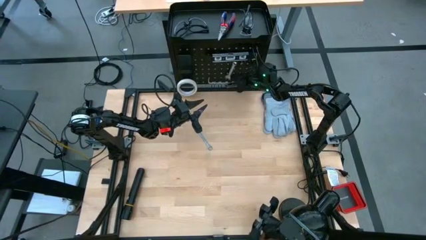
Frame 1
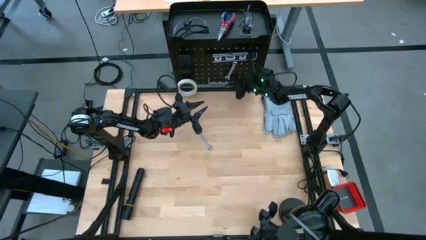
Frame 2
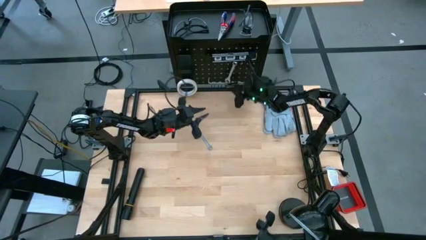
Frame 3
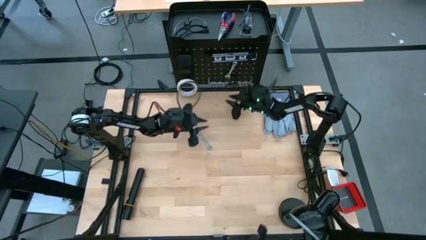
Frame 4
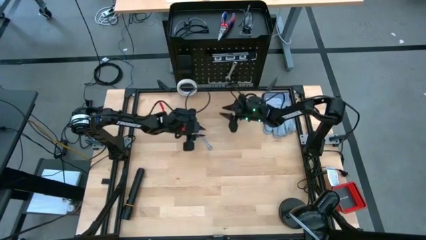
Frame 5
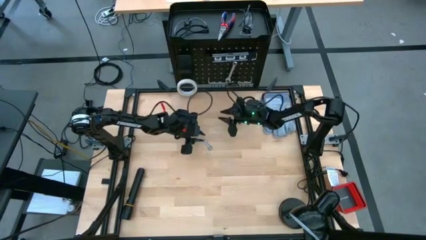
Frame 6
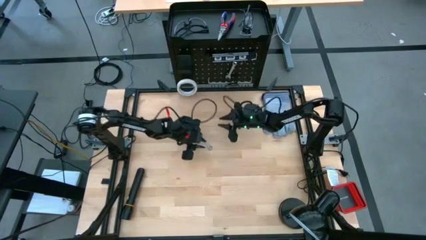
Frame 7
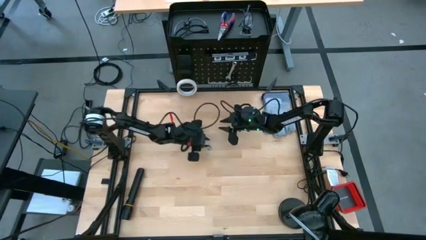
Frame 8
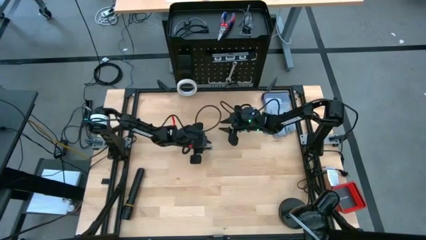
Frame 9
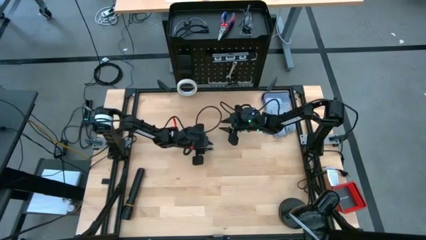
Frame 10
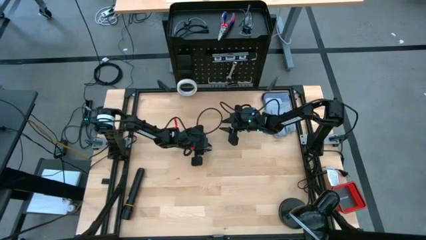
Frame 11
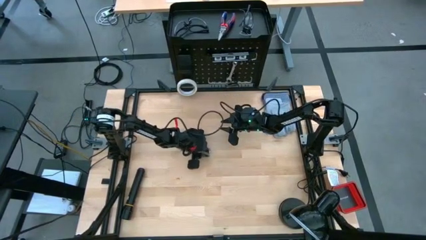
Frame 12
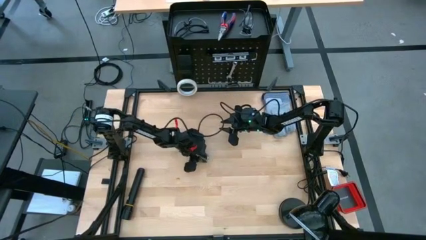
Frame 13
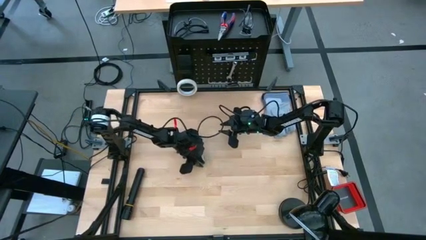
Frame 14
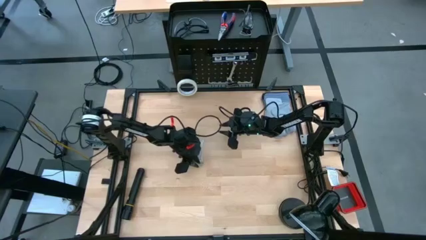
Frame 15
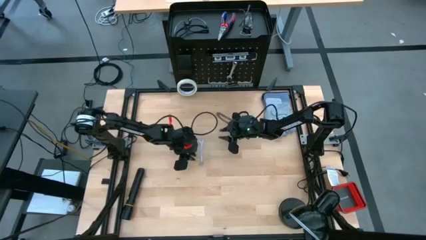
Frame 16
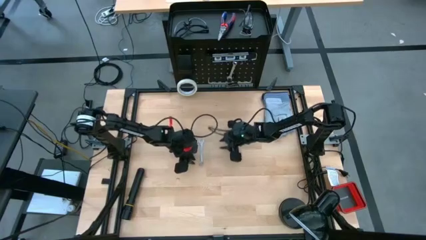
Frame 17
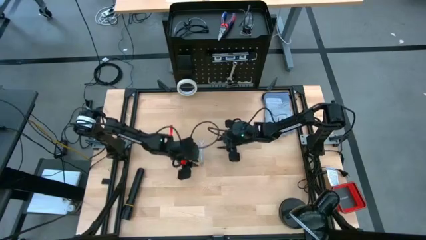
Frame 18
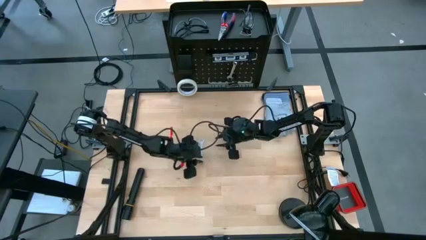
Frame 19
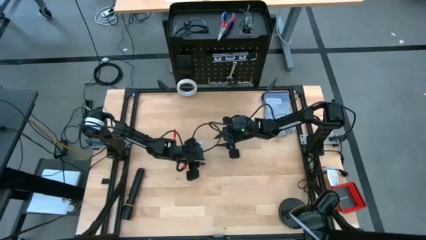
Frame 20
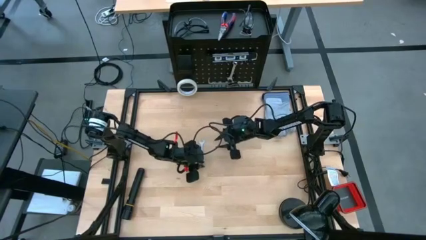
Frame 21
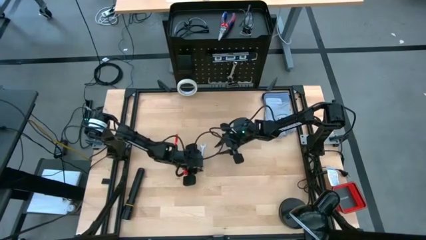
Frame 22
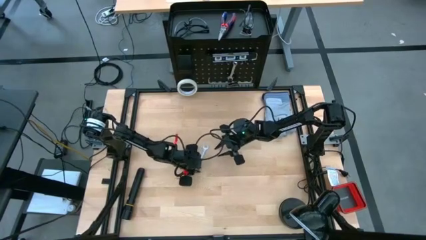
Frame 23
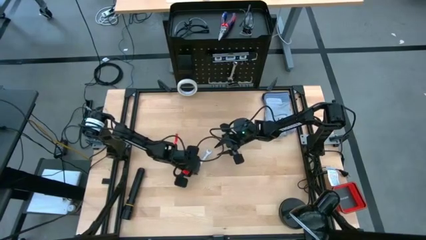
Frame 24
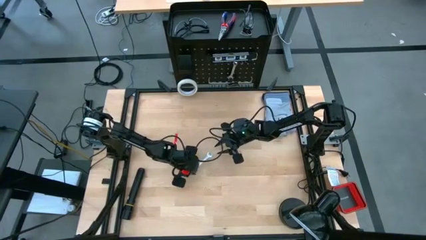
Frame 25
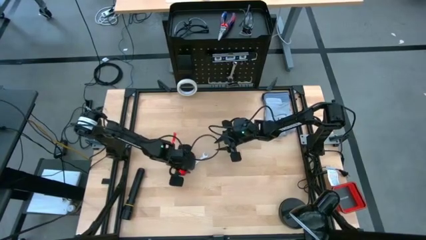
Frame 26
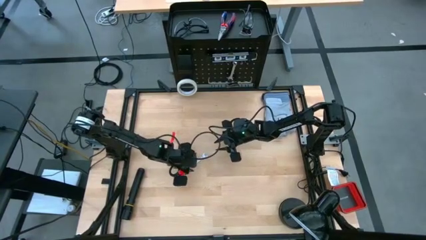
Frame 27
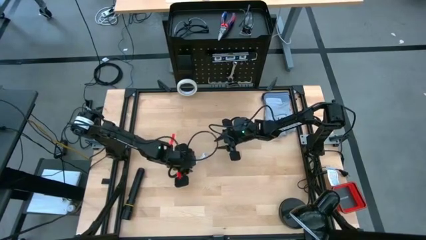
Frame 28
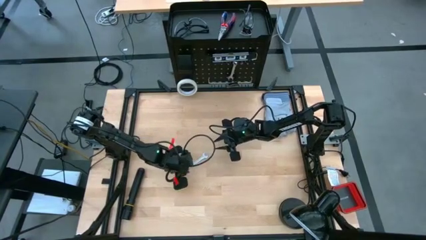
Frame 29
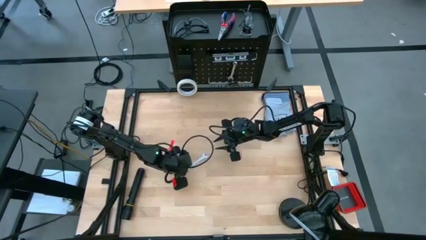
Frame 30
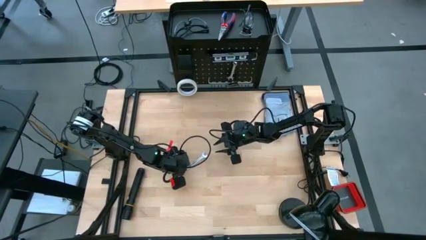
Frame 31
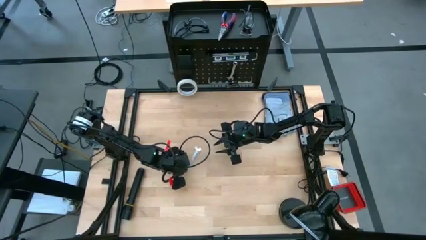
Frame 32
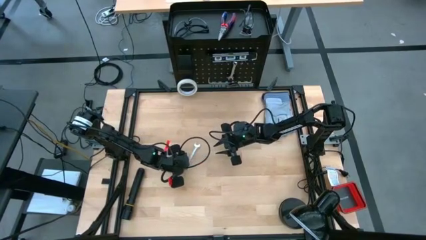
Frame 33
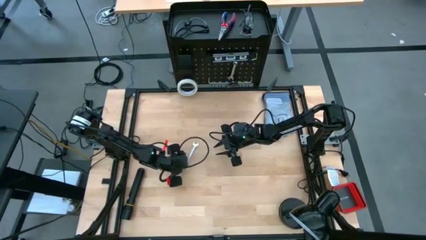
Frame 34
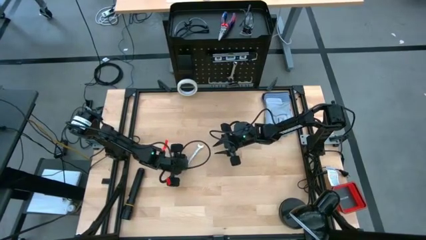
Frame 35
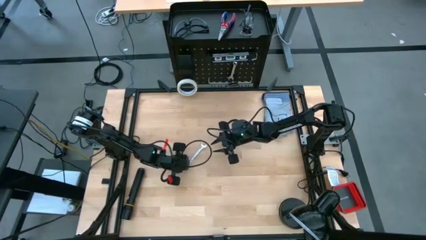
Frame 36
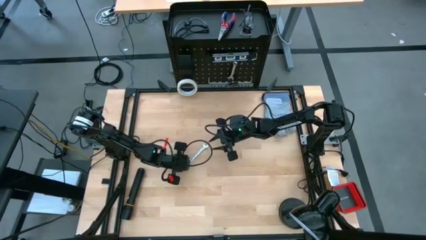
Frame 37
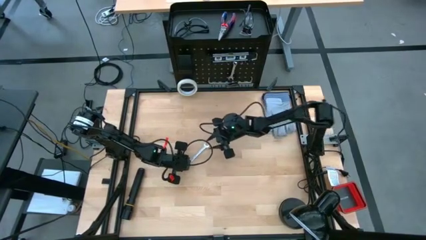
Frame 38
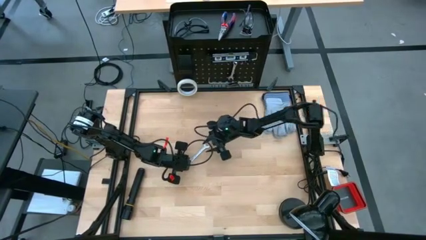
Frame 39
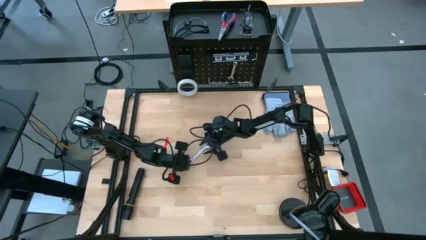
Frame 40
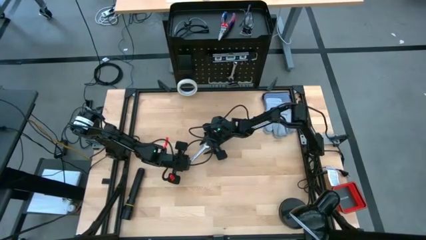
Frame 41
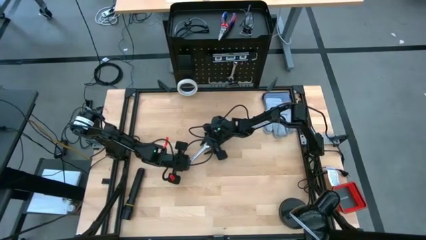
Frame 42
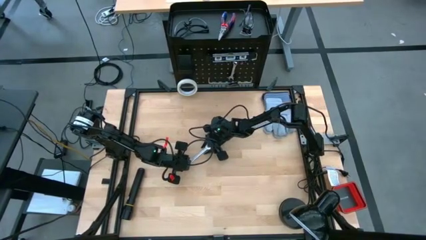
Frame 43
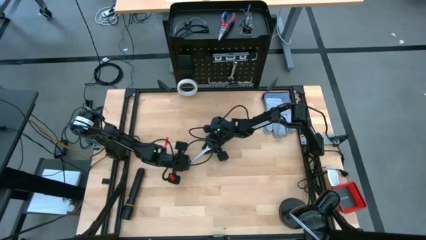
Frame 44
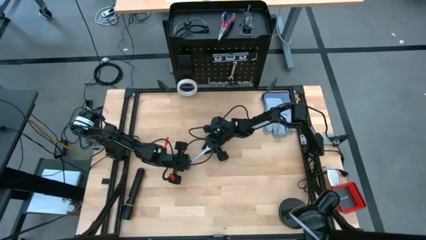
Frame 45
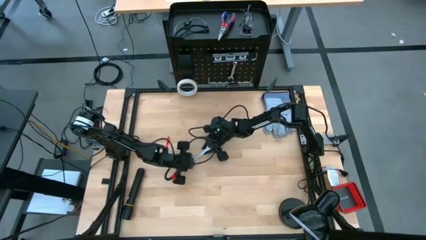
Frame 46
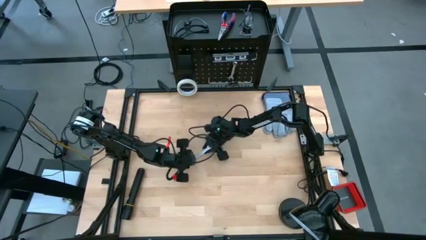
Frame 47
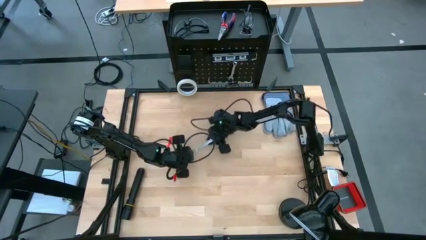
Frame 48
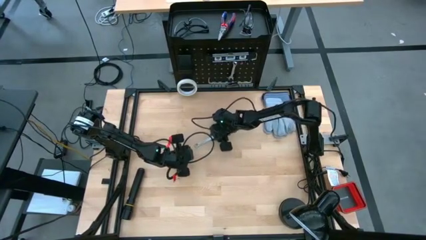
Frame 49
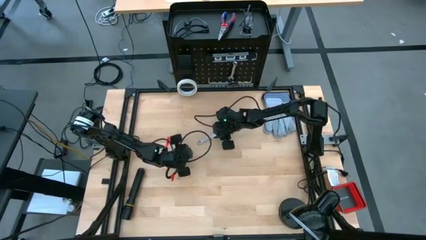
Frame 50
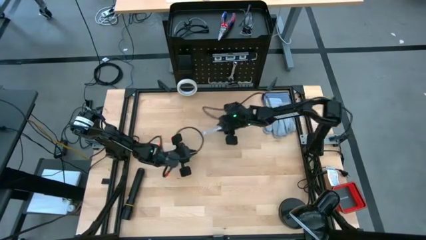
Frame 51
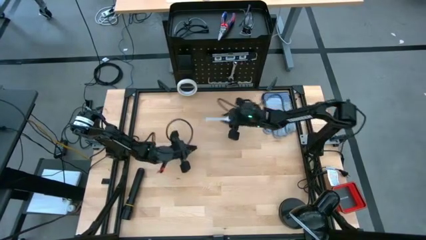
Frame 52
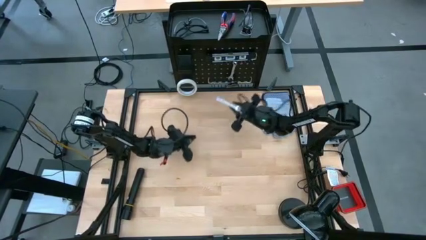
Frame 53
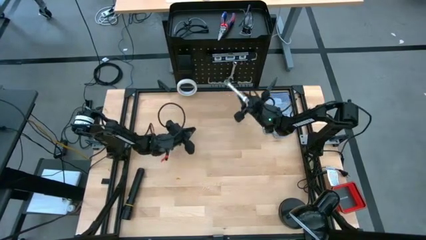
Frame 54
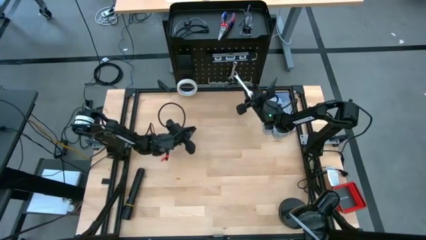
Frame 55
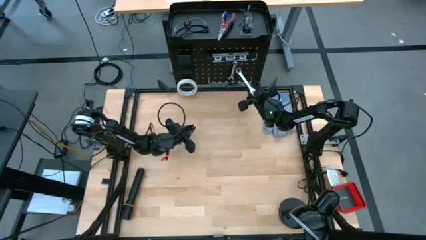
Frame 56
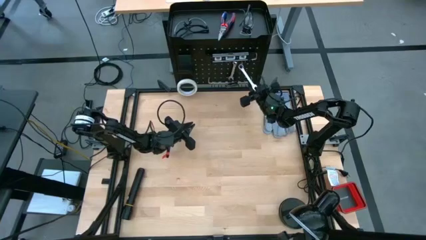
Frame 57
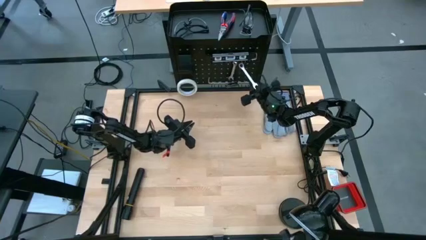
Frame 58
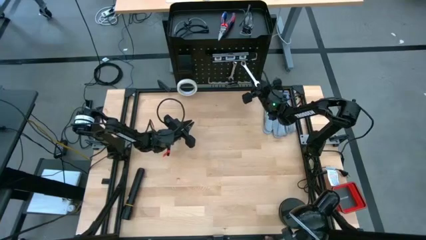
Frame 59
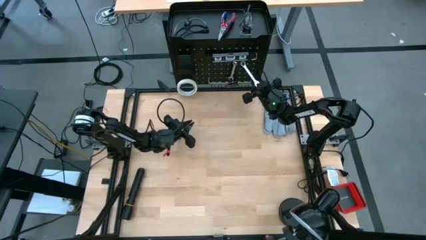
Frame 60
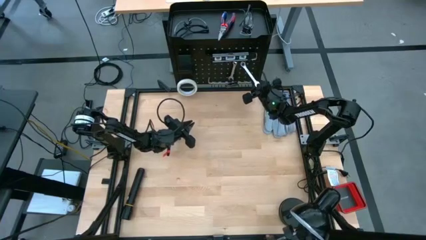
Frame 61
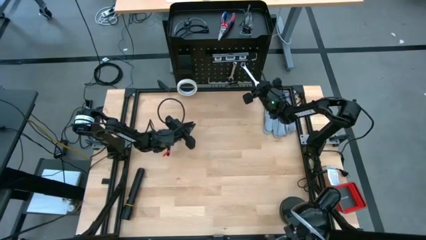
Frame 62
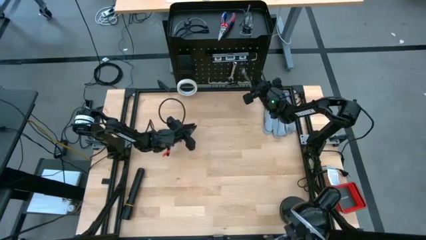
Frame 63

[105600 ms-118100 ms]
Task: Hang tools onto peg board
Hang the silver wrench on the black pegboard

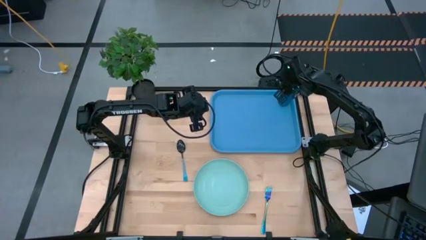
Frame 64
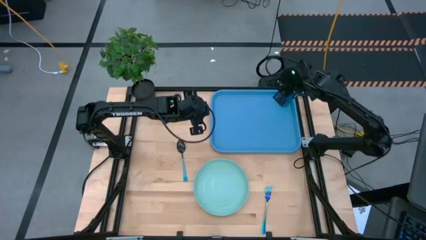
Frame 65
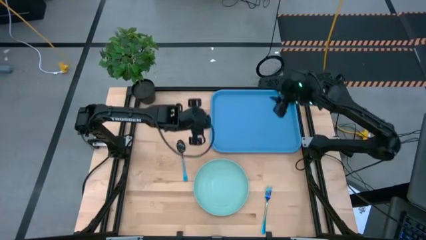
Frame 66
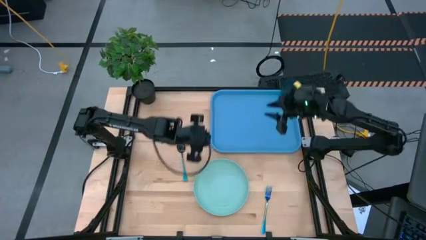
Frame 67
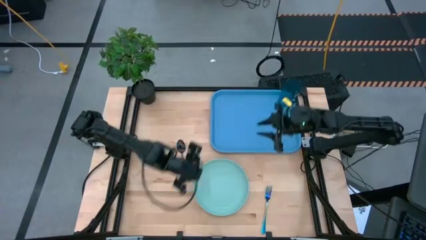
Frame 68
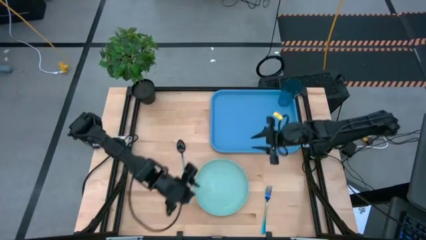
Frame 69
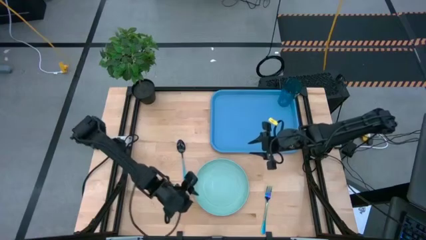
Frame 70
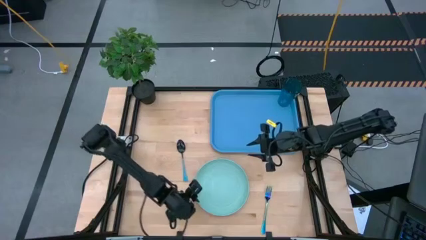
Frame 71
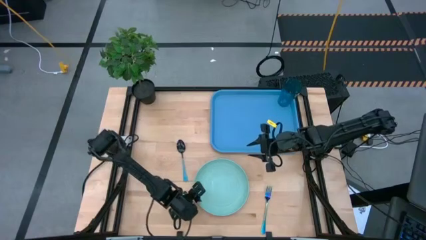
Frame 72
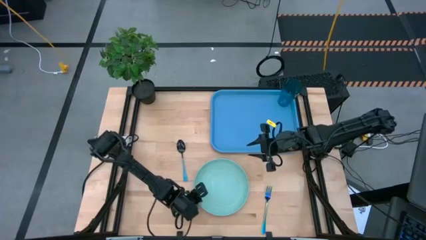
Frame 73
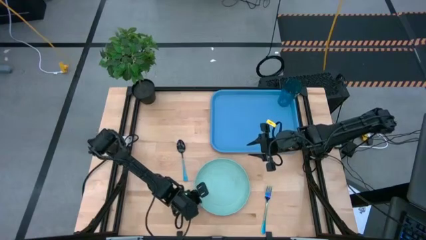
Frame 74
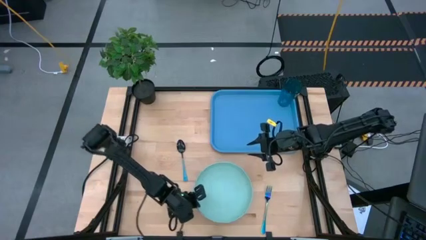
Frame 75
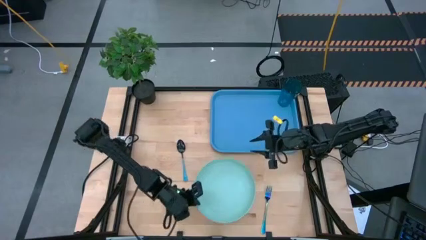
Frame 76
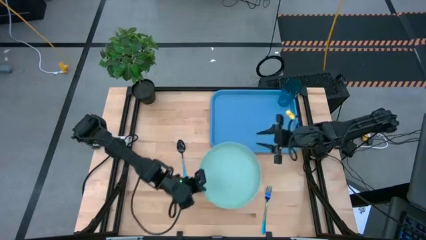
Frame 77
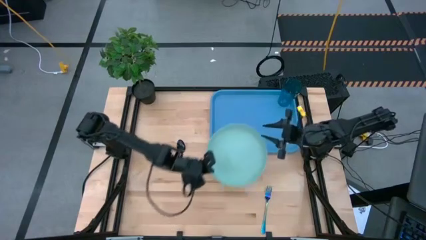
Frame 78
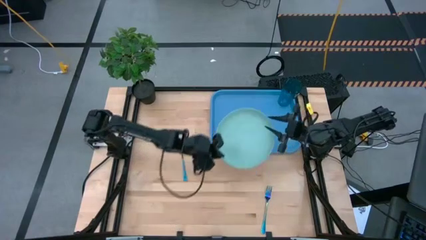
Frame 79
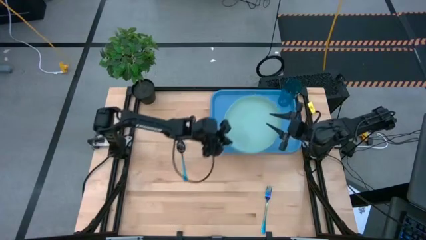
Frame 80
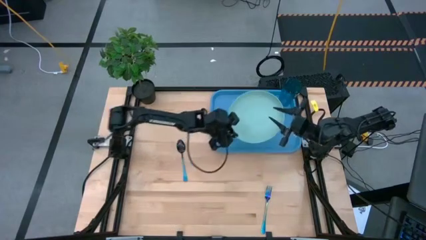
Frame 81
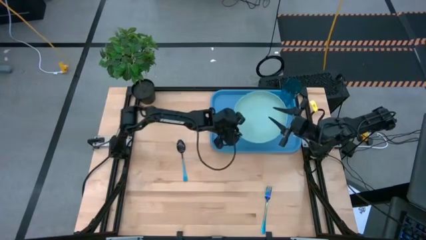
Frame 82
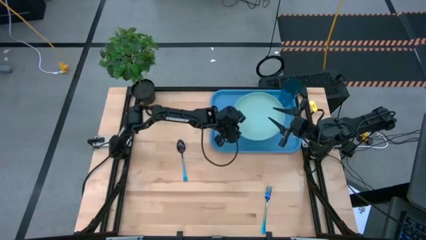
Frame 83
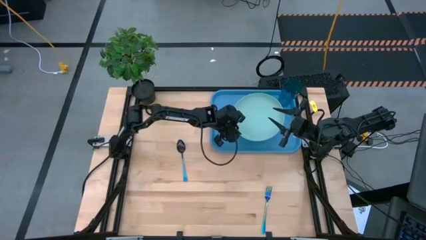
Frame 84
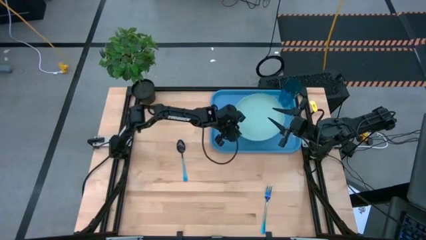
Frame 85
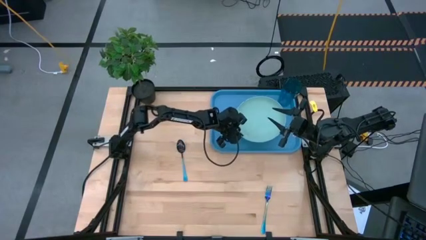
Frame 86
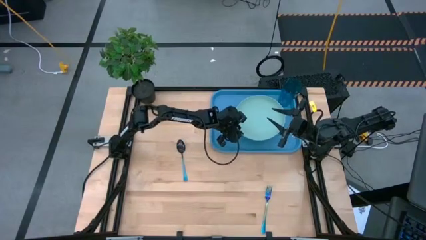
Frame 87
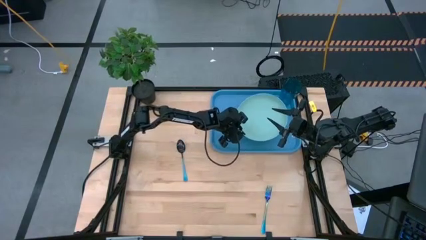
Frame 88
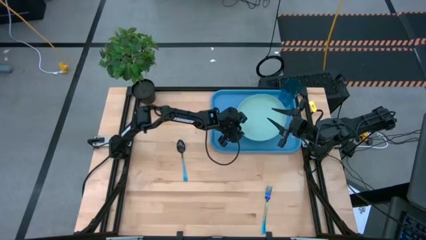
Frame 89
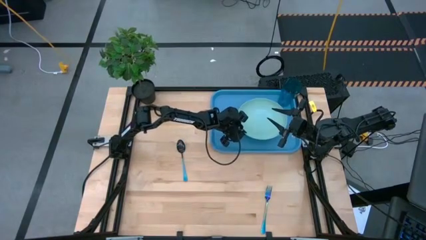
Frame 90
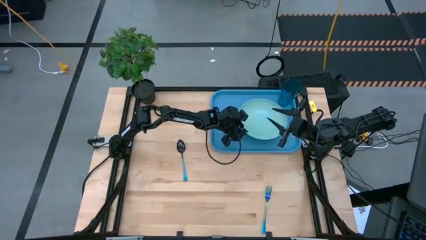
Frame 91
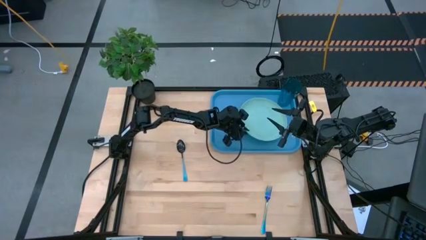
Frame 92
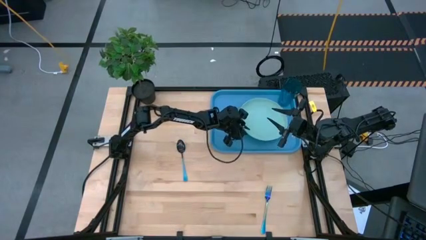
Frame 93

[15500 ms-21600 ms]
Task: Pick and place plate/cup/fork/spoon on tray
Put the light blue plate in the blue serving tray
